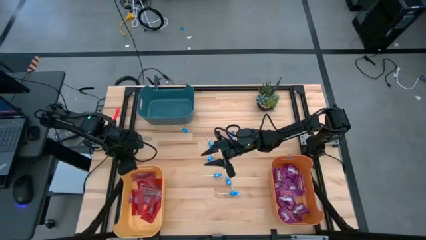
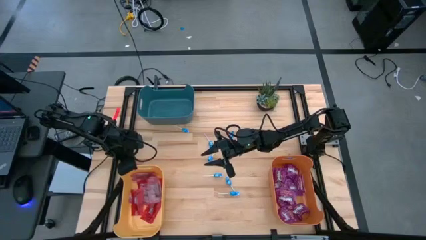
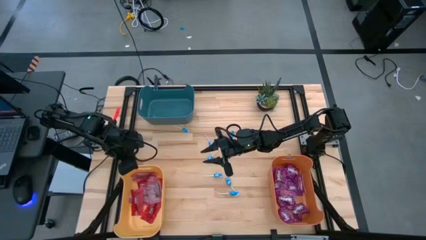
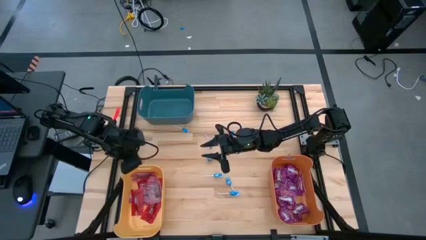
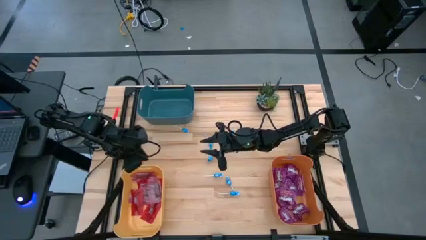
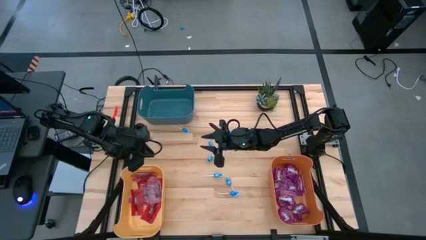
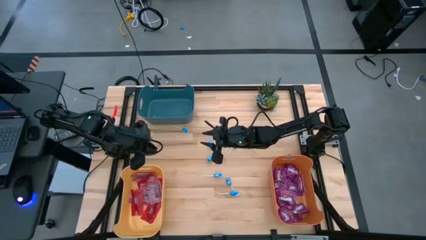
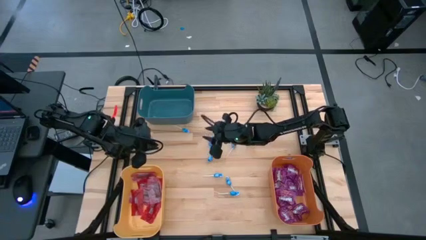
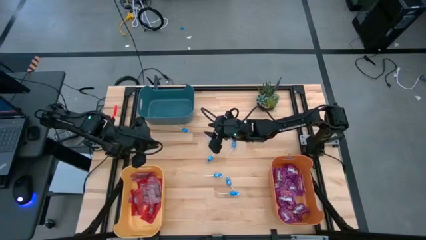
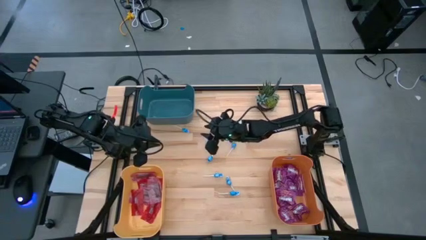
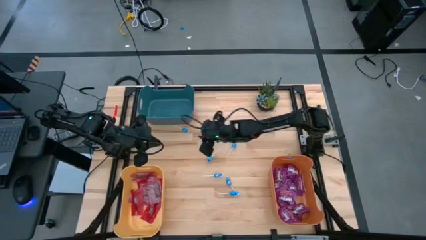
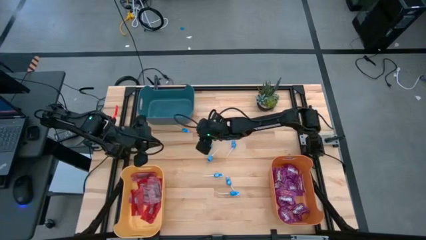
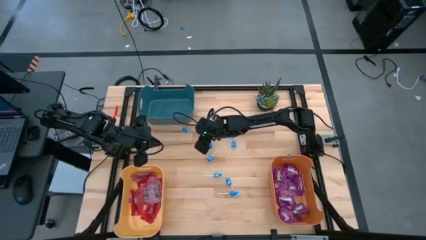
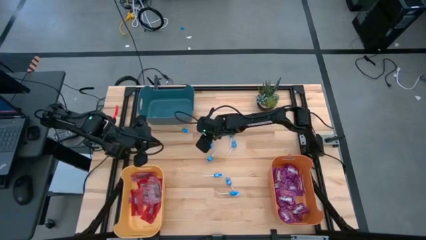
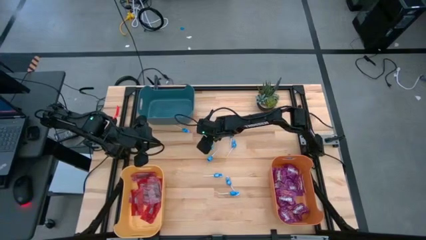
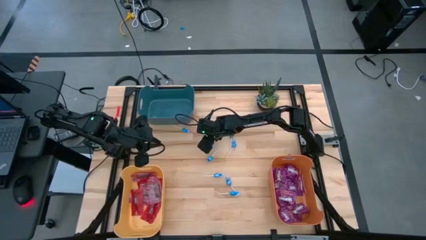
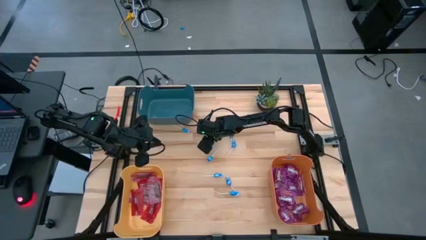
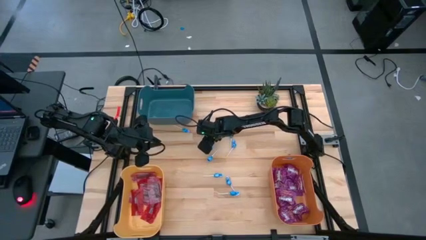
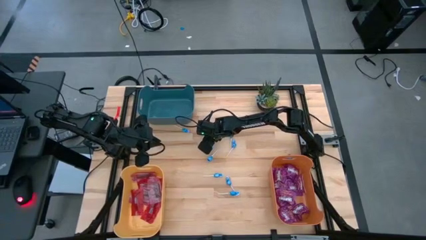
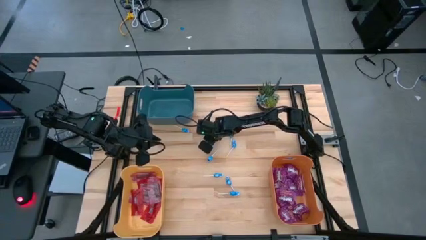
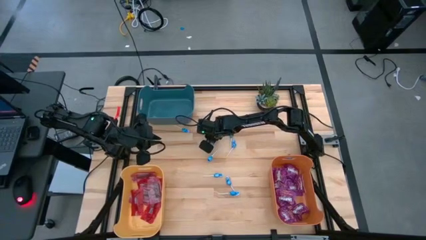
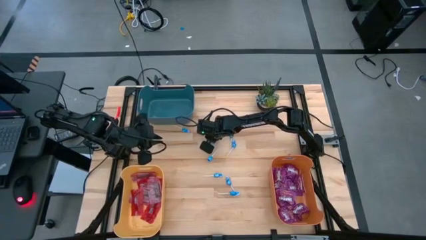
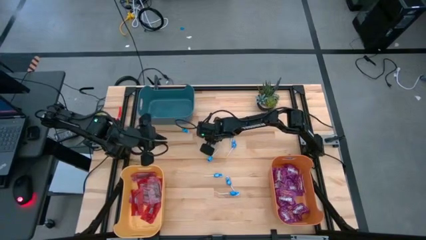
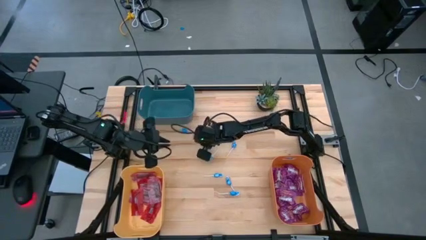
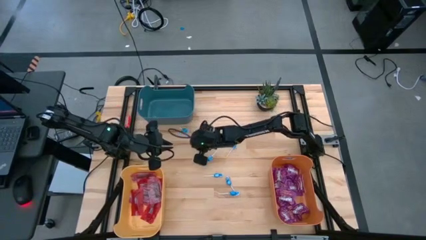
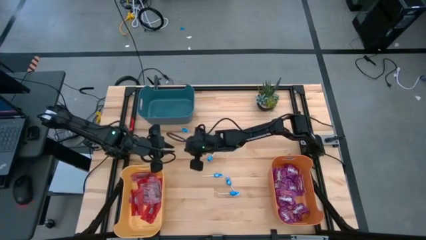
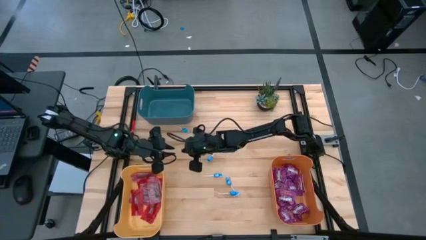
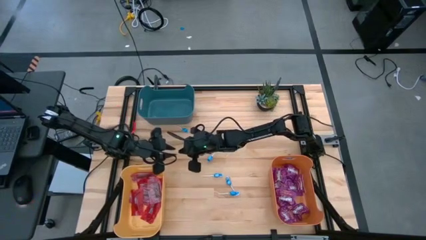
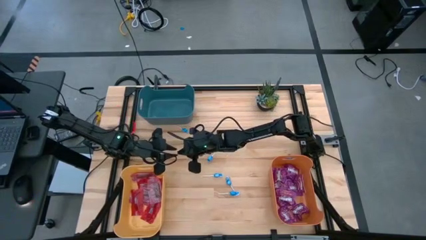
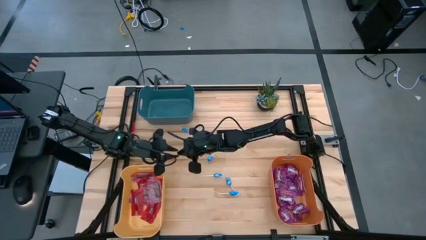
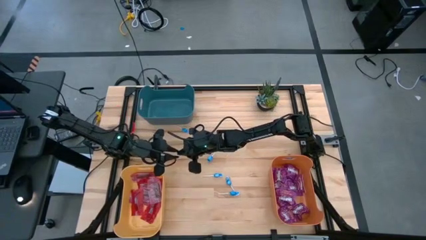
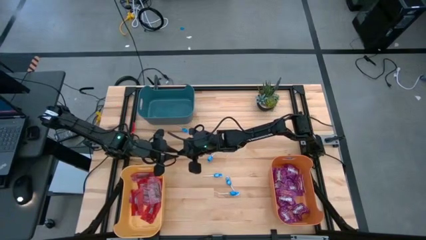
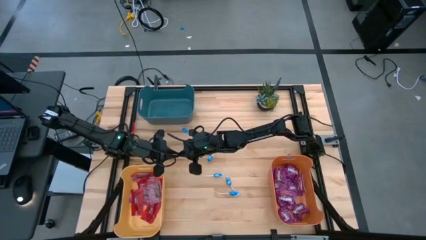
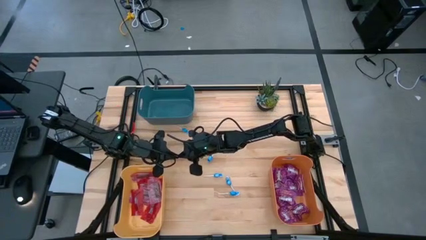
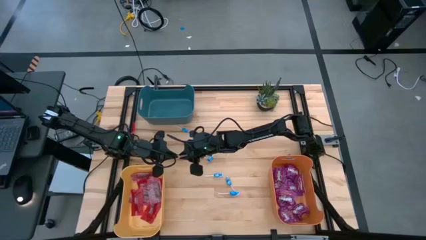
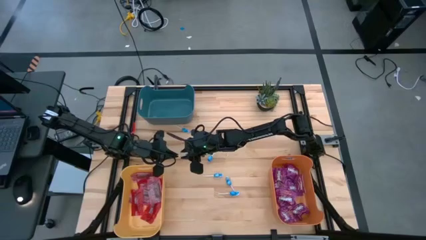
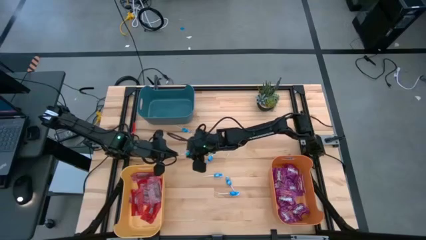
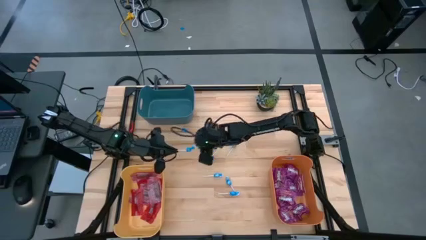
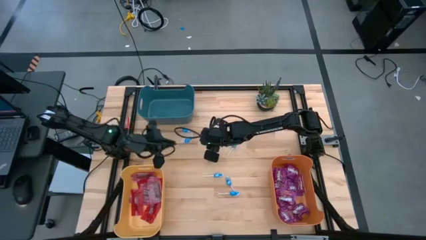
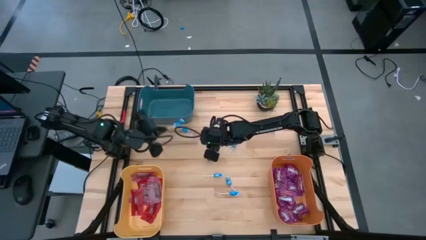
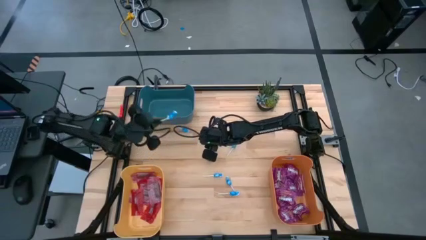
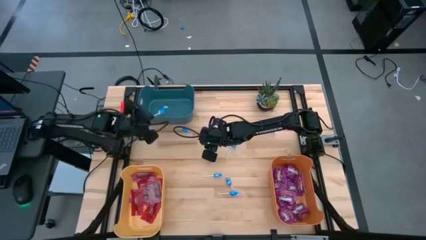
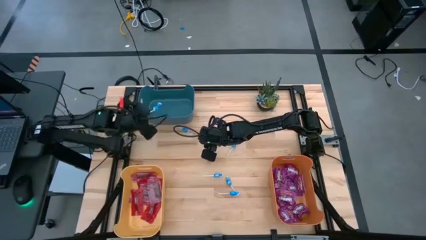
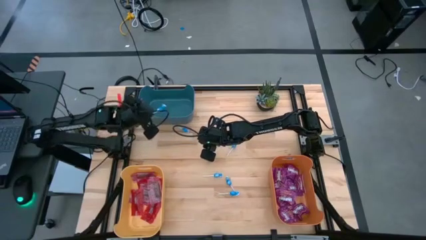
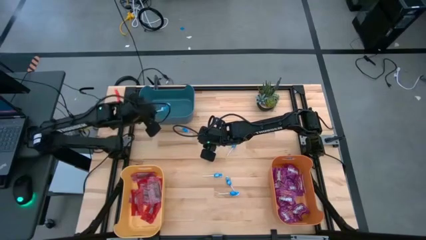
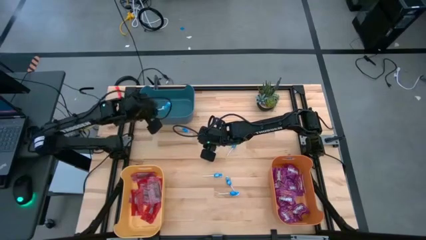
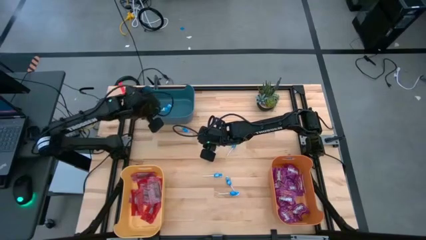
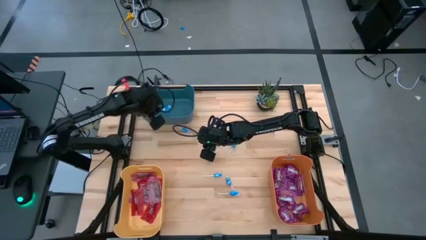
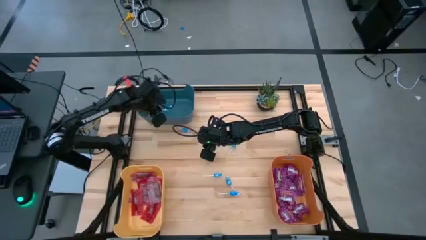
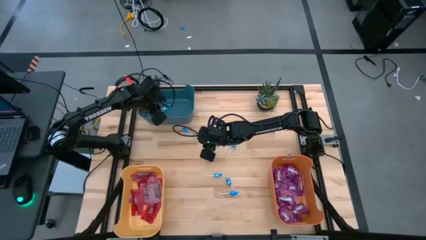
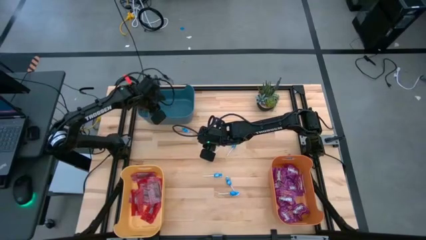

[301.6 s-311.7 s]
Task: Sort candy
Put the blue candy into the blue bin

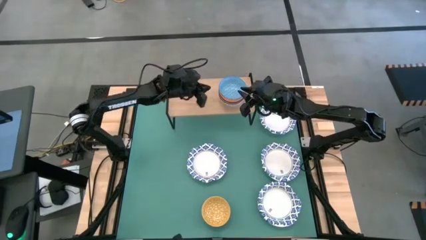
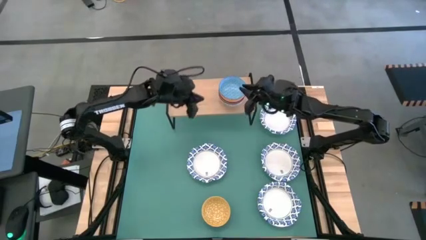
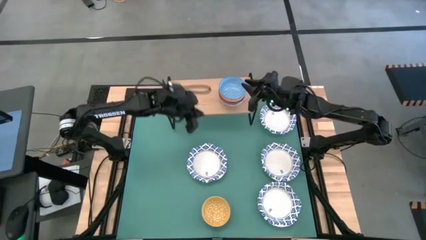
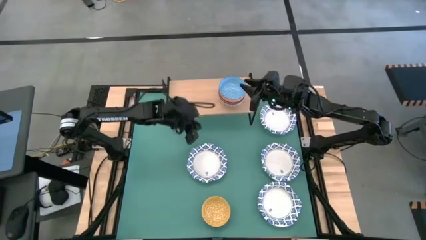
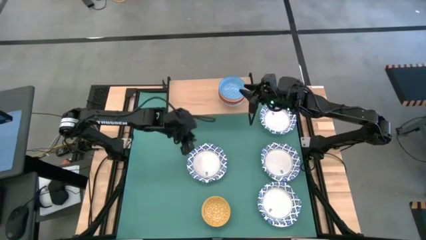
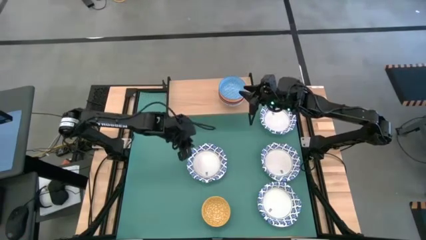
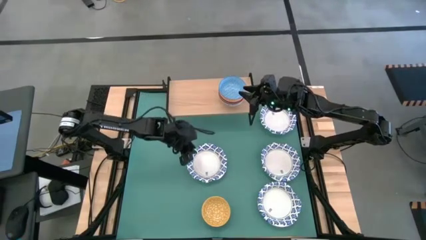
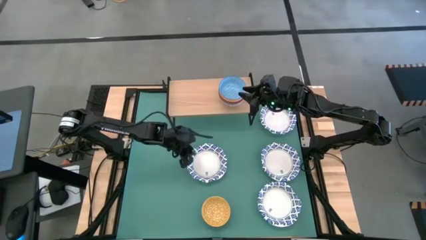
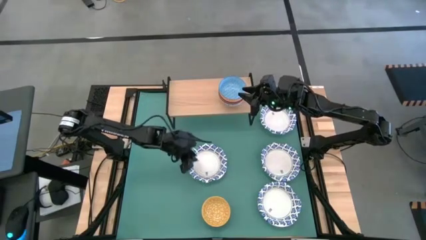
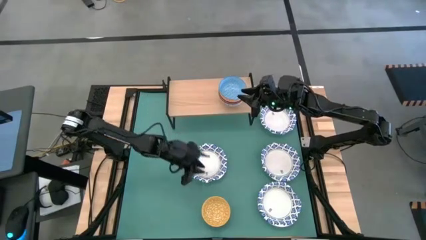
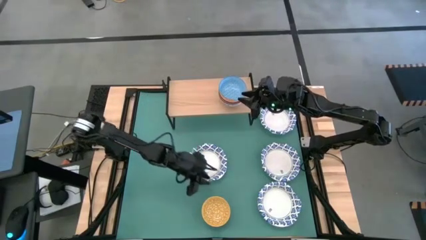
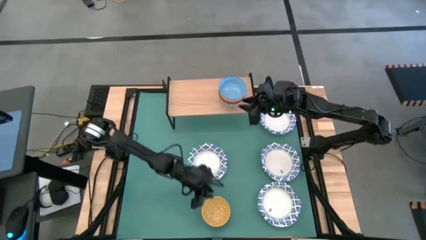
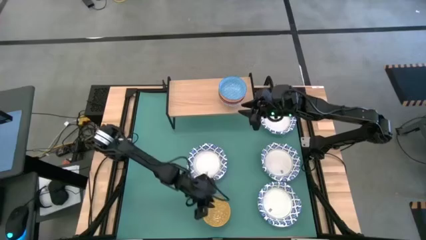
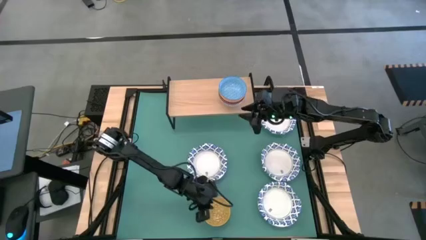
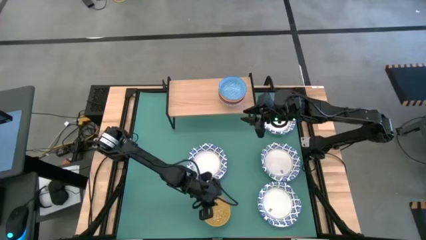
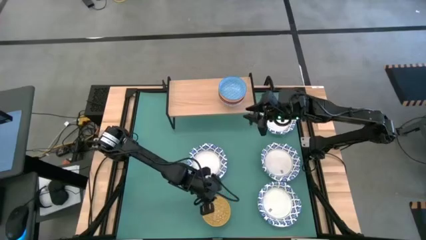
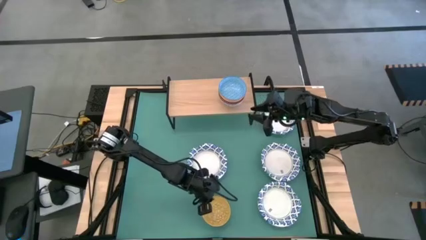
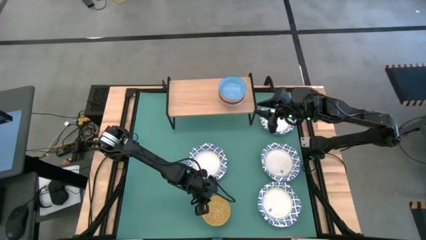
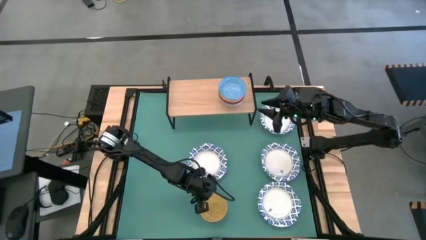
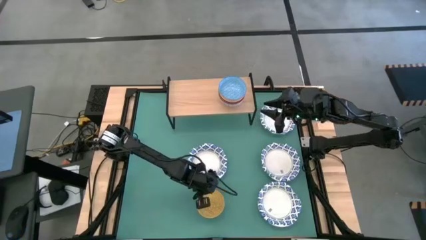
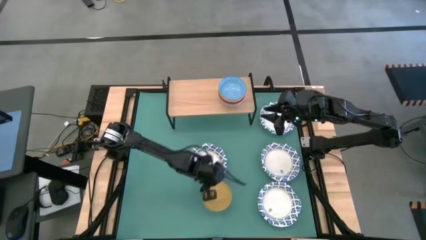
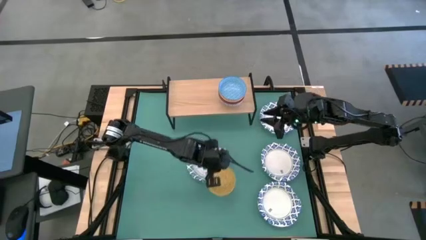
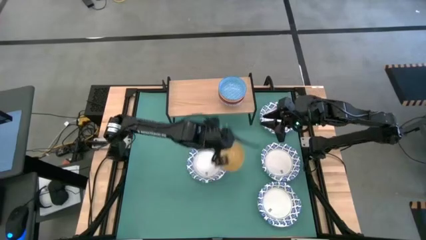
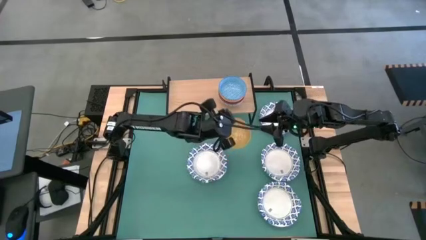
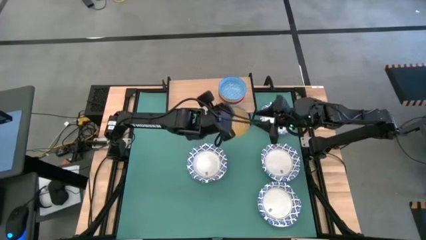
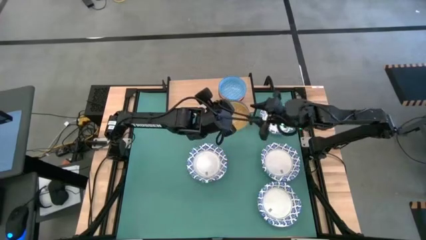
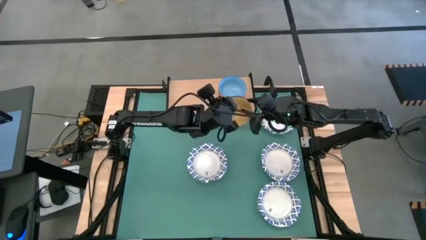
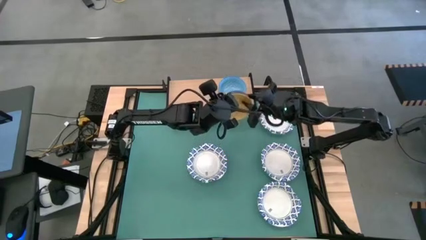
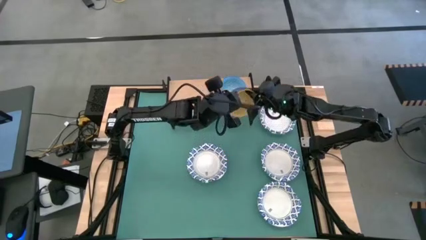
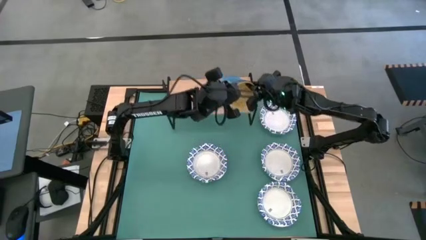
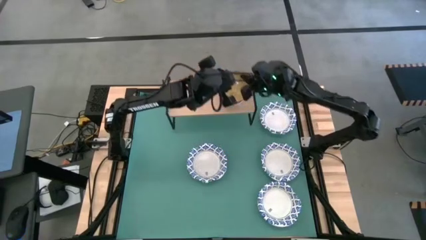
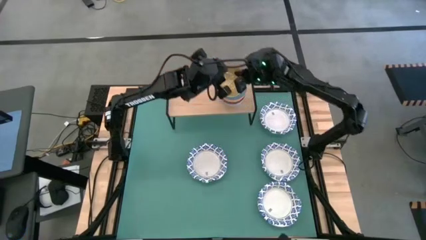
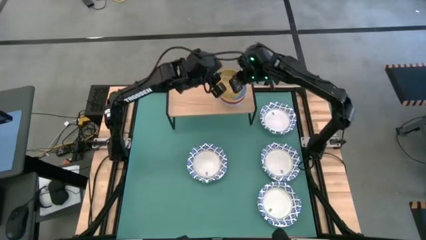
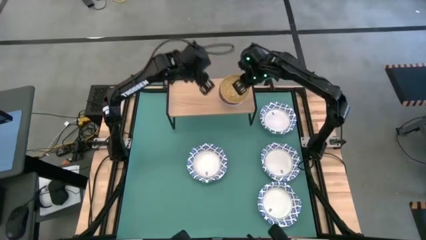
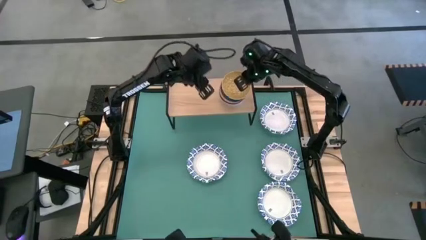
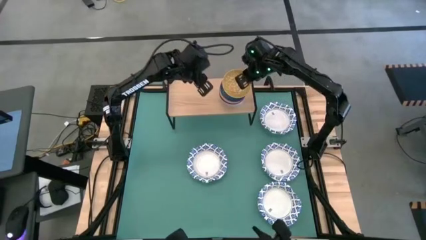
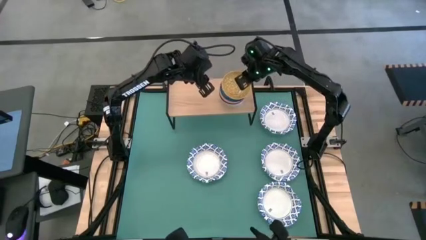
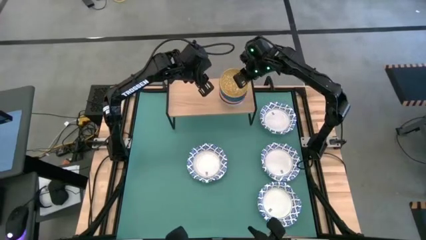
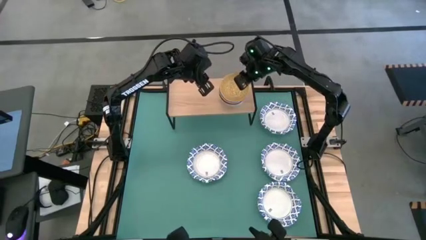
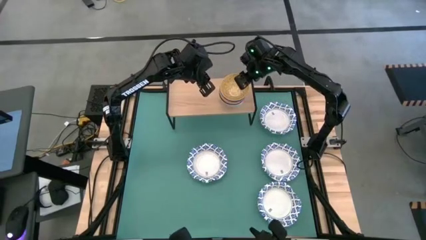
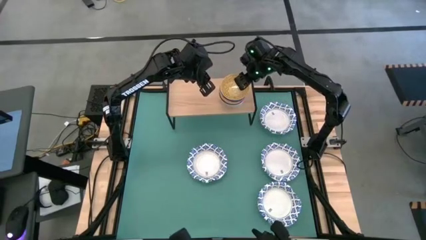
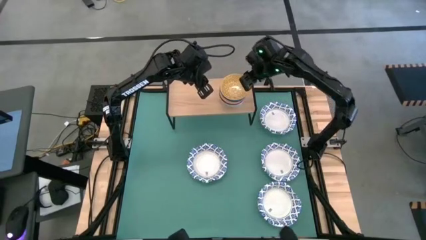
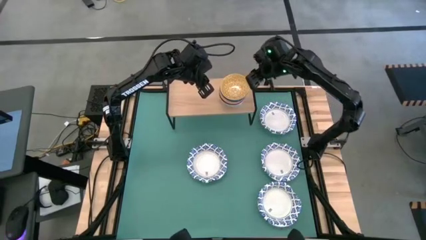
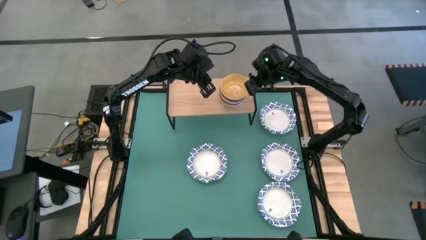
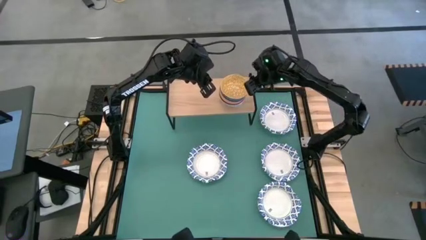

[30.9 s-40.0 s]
Task: Place and stack bowls onto a shelf
Stack the yellow bowl on top of the light blue bowl on the shelf
